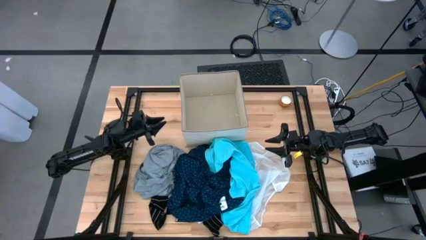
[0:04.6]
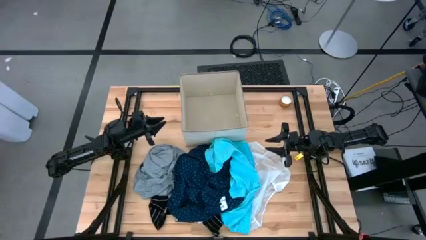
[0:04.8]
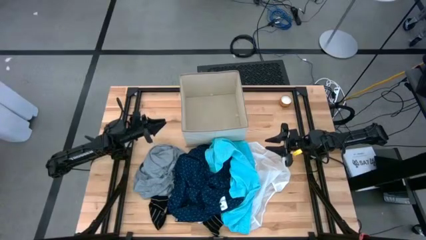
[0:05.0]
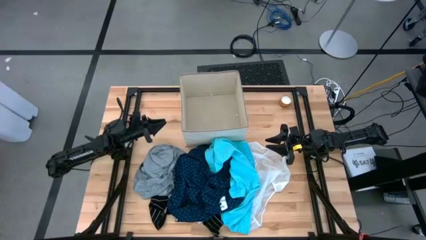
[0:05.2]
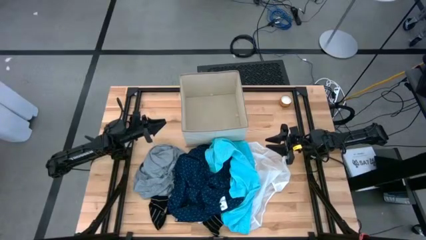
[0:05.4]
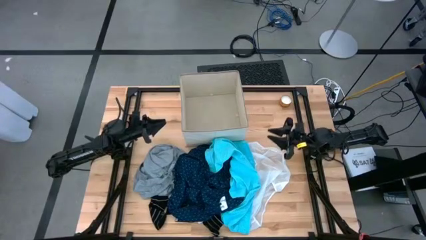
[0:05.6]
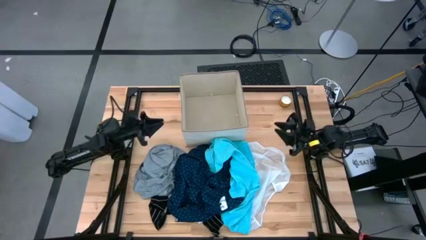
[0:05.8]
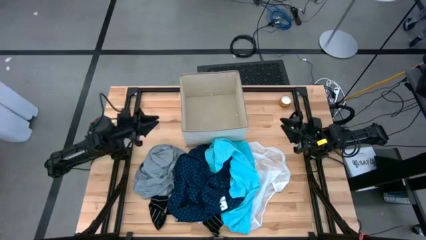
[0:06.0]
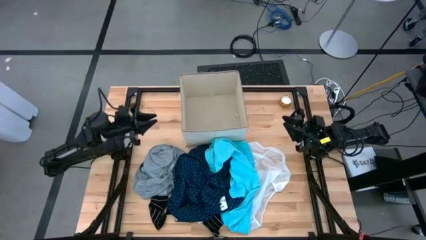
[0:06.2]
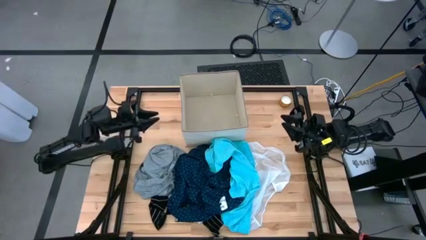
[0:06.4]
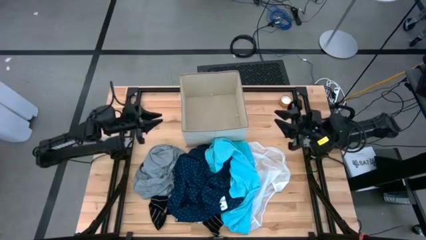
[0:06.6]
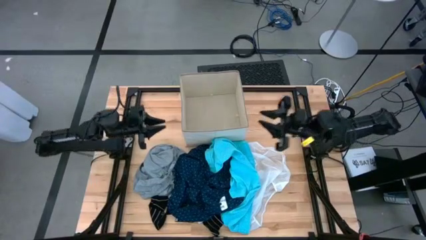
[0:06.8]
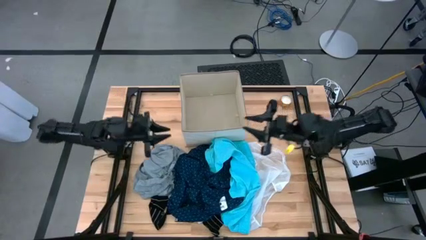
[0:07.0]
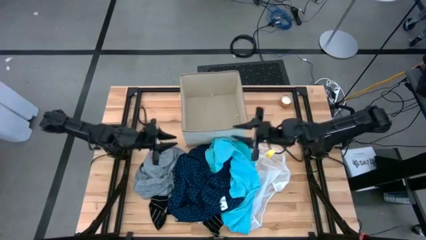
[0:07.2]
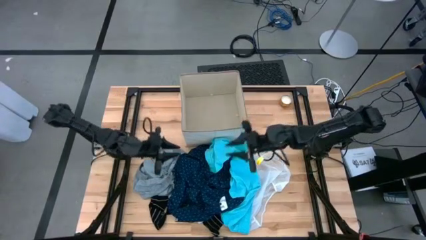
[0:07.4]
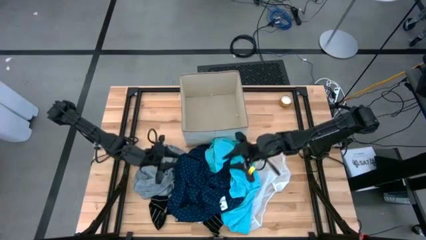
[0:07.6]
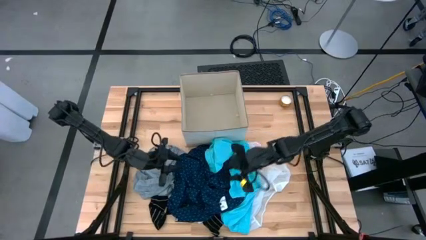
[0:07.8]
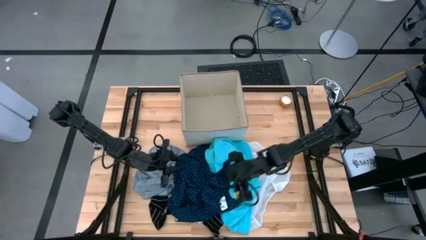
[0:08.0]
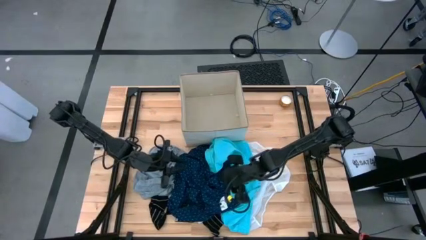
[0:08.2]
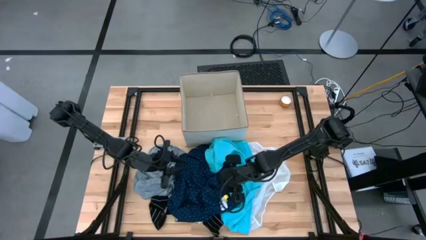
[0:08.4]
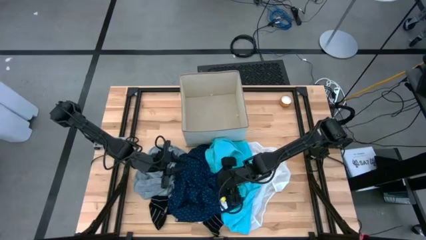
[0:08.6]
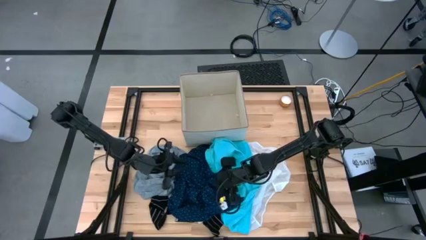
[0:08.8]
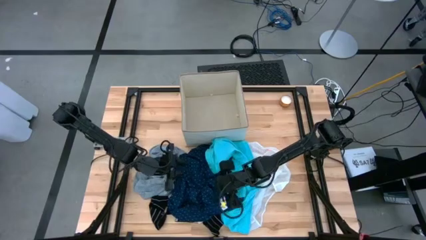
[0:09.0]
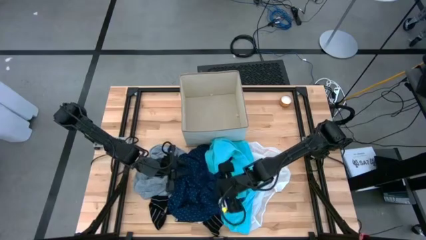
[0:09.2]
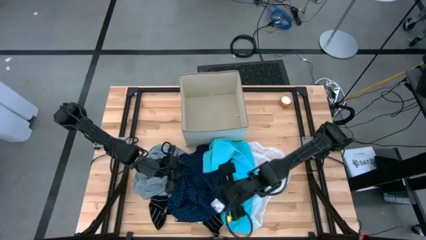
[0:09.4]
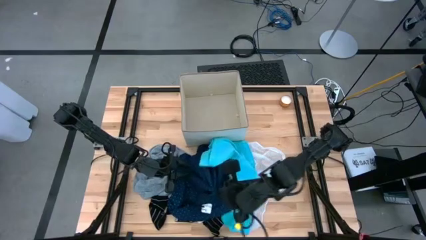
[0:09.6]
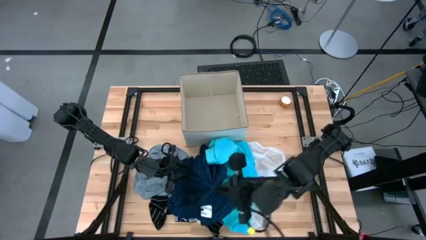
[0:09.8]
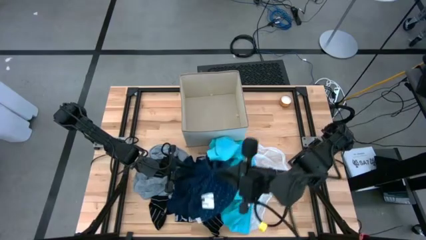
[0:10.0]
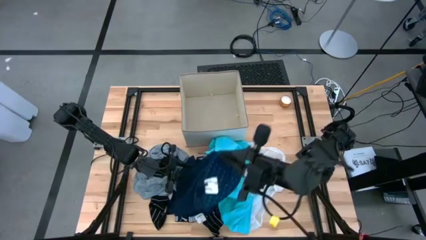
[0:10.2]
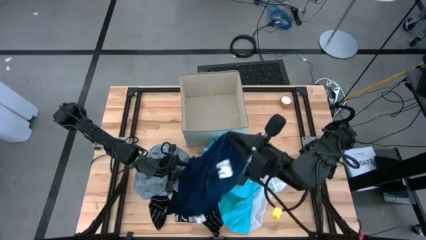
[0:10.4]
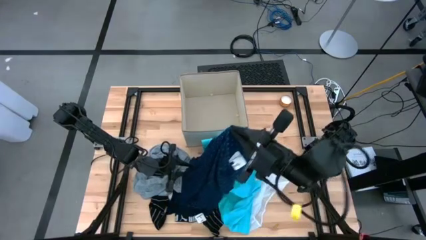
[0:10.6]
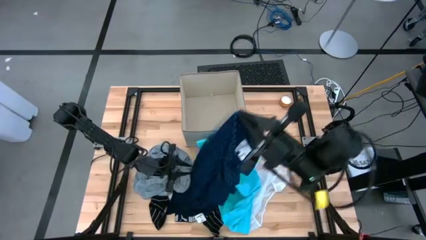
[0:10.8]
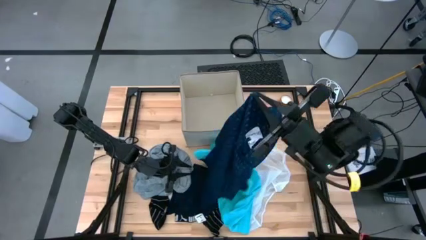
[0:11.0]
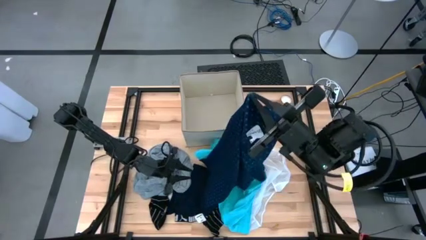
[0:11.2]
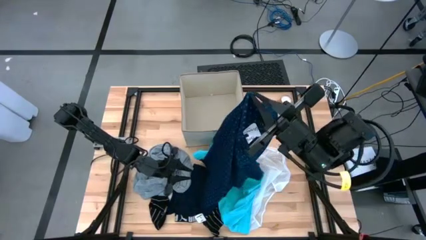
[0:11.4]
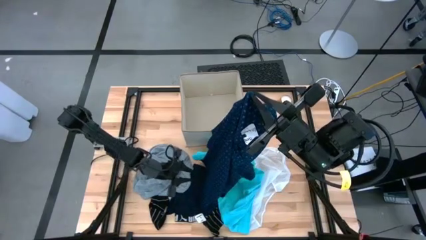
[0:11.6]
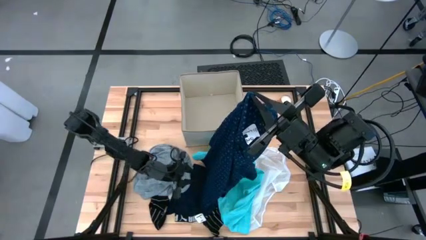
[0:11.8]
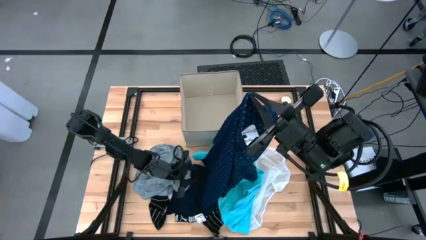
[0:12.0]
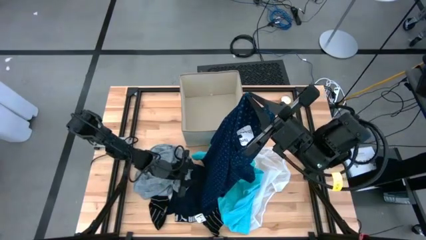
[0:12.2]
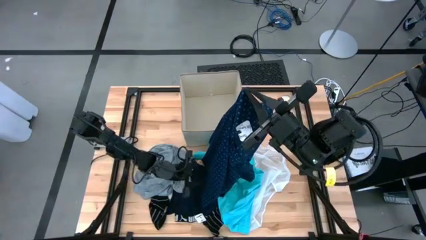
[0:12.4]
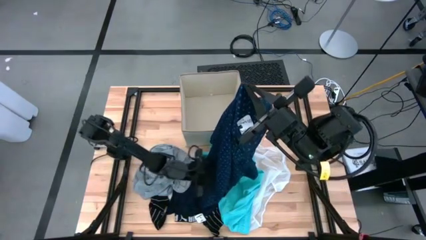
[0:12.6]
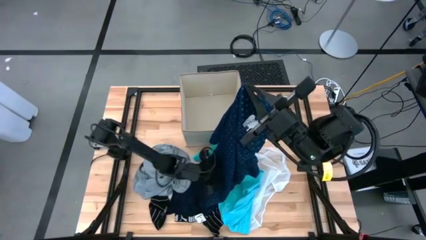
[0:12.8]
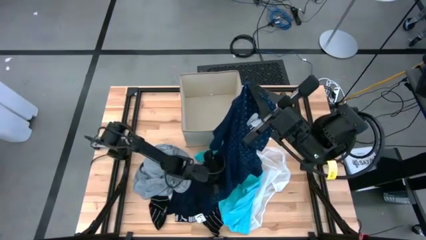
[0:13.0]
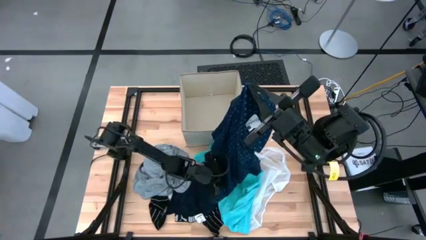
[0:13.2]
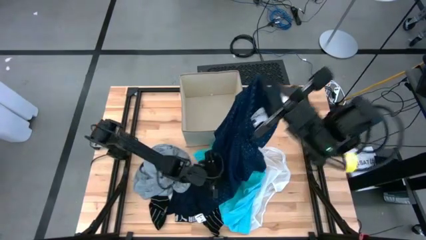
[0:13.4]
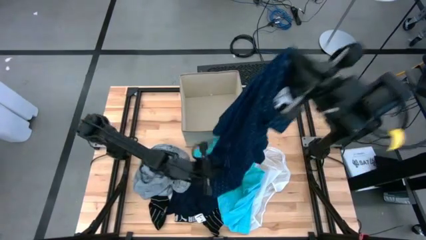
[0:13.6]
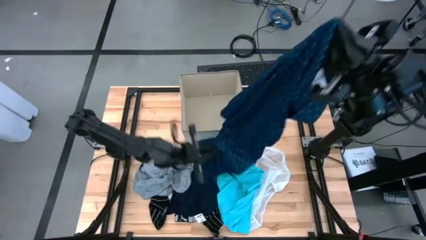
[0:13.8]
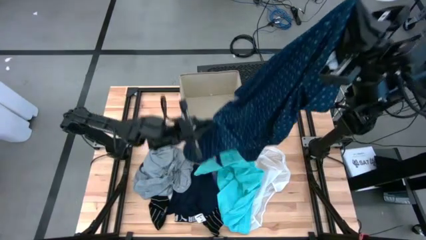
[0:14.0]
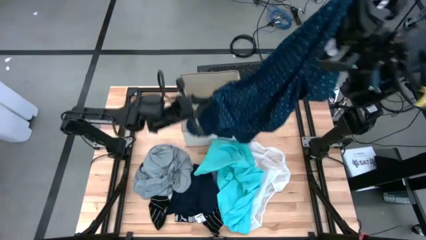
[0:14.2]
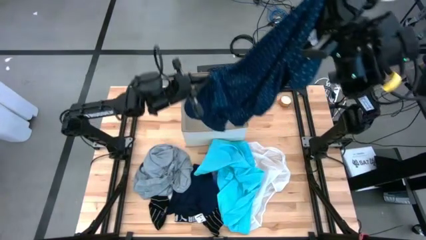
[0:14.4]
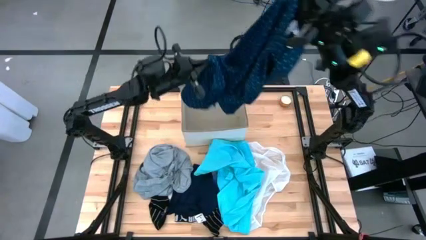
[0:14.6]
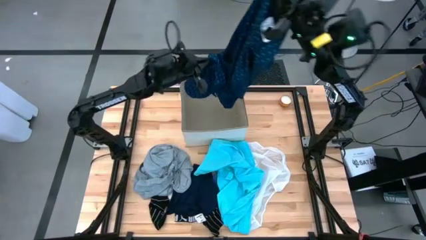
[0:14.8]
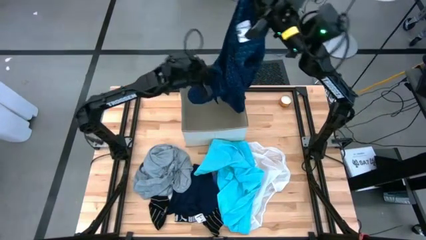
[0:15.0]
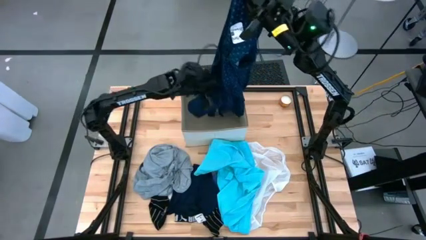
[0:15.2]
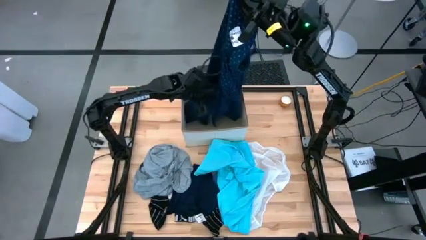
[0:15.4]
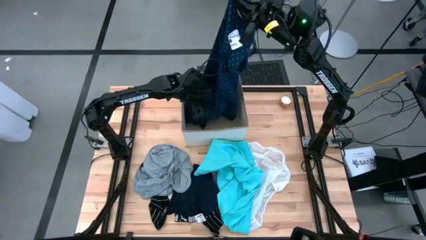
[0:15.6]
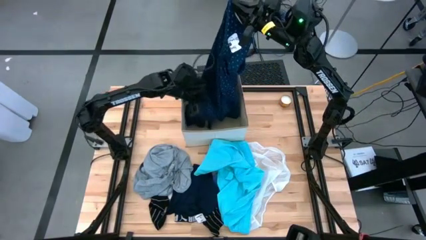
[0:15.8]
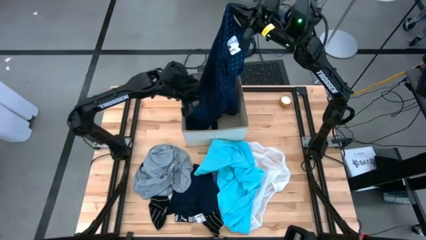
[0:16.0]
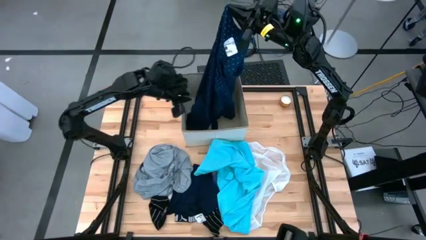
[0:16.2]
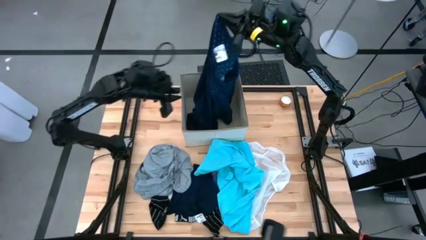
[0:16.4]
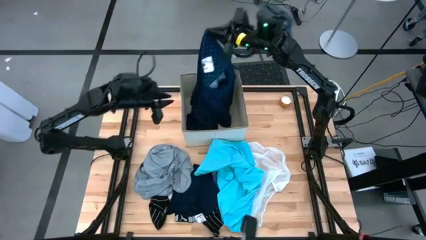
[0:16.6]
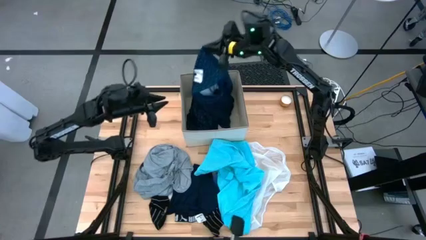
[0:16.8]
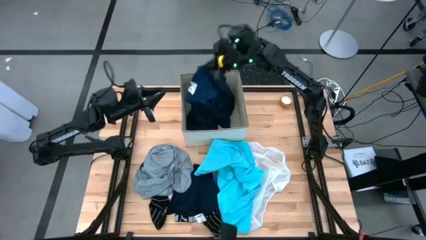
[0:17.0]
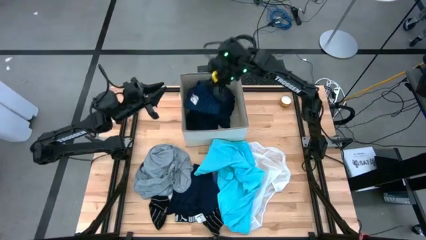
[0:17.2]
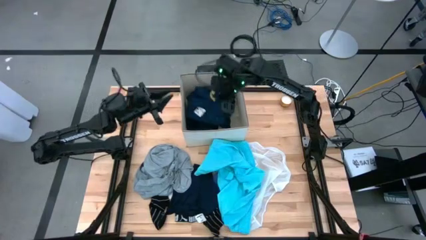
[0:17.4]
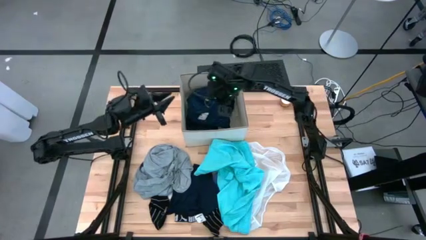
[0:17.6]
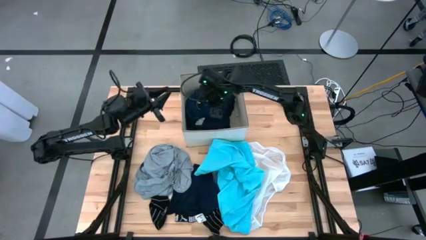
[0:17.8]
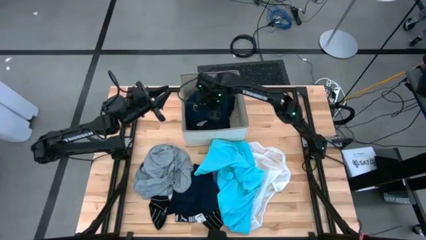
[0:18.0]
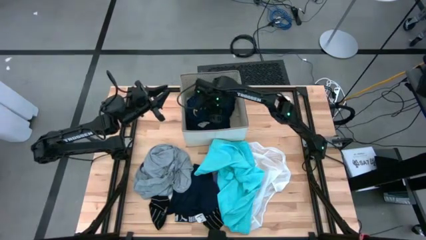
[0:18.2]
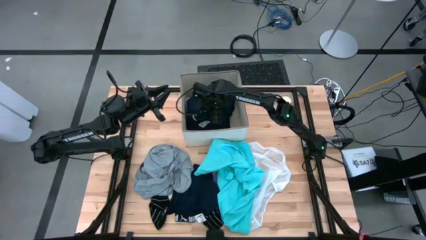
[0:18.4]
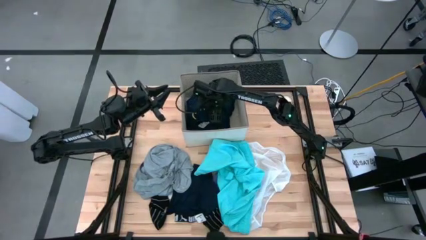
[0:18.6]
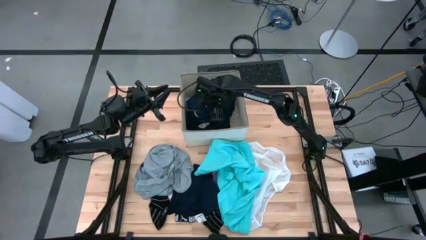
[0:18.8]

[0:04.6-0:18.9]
Task: Sort clothes
Put the blue shirt into the laundry bin
